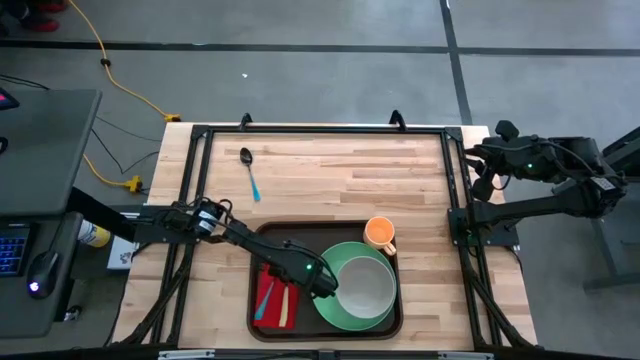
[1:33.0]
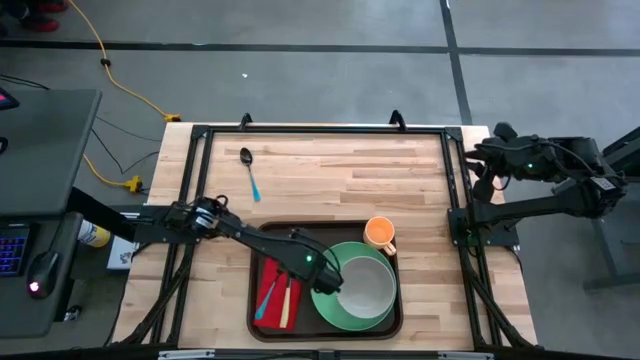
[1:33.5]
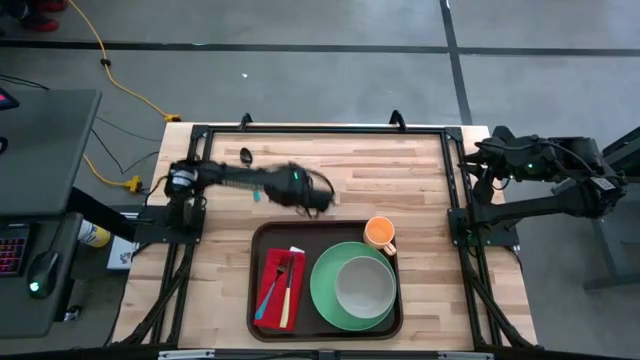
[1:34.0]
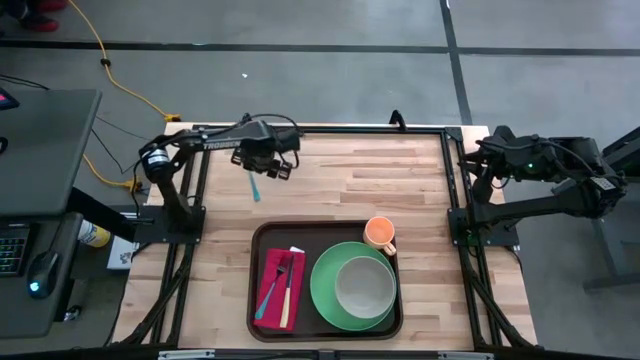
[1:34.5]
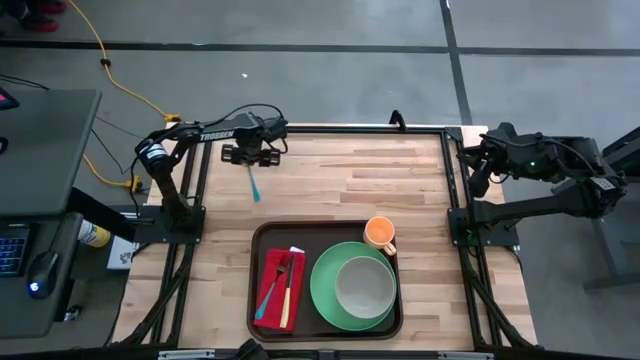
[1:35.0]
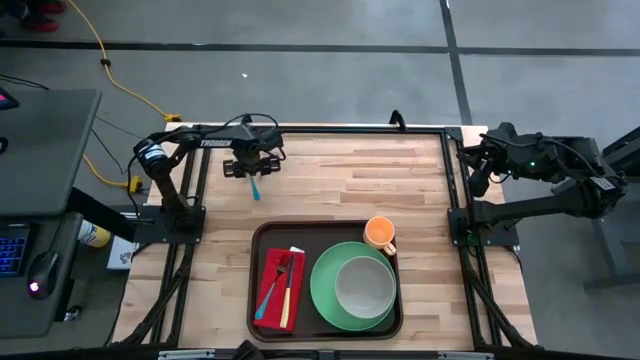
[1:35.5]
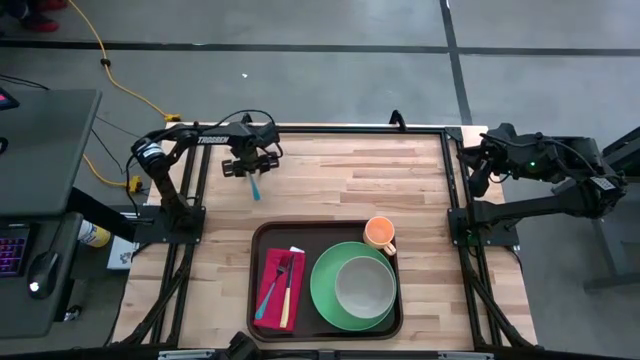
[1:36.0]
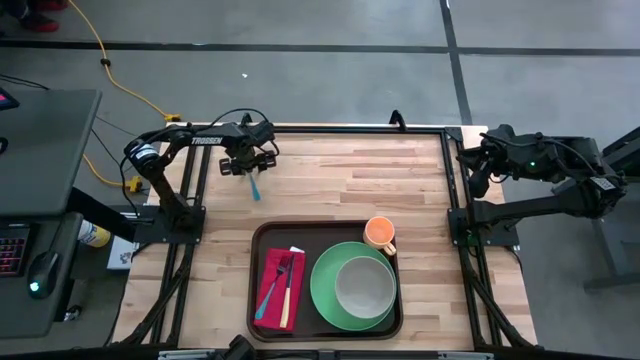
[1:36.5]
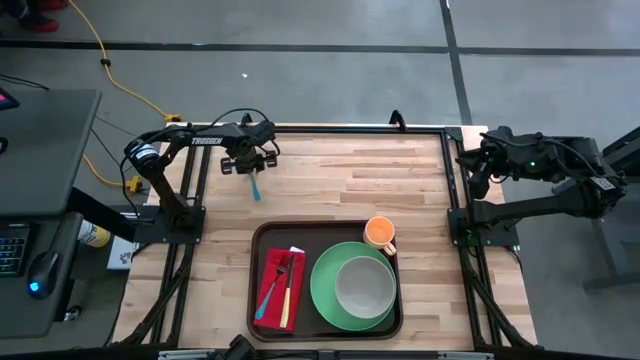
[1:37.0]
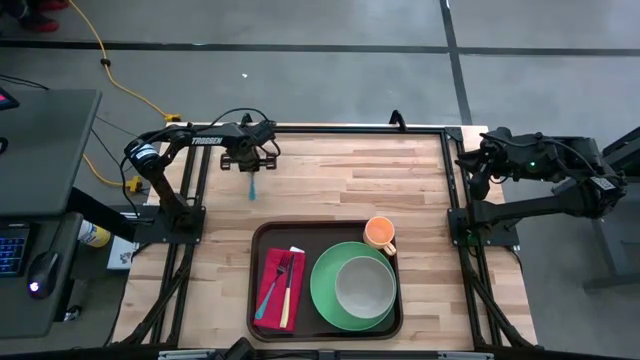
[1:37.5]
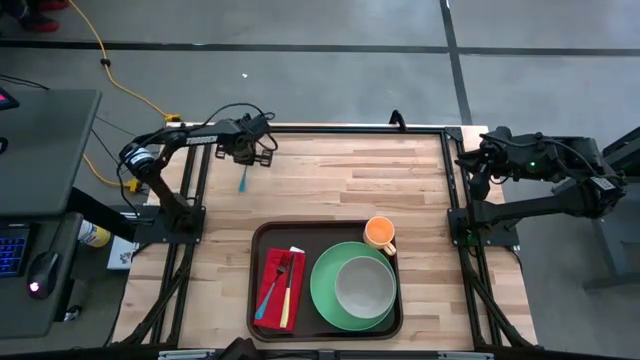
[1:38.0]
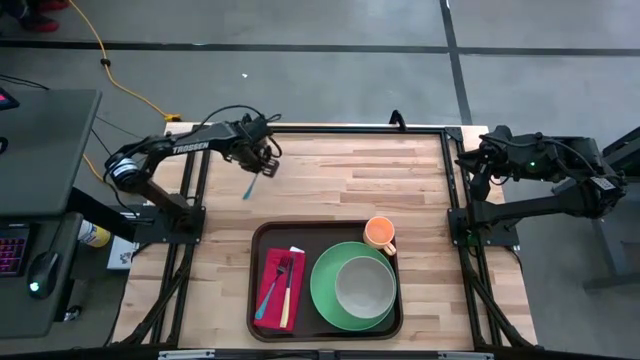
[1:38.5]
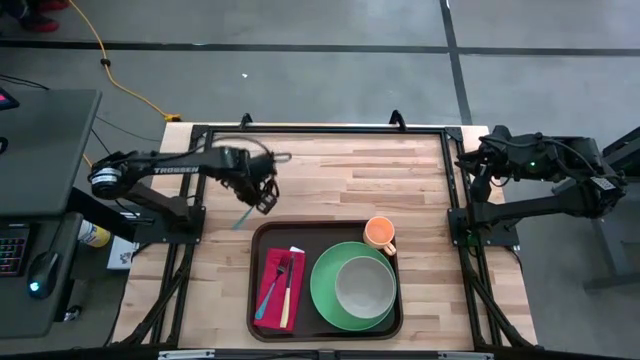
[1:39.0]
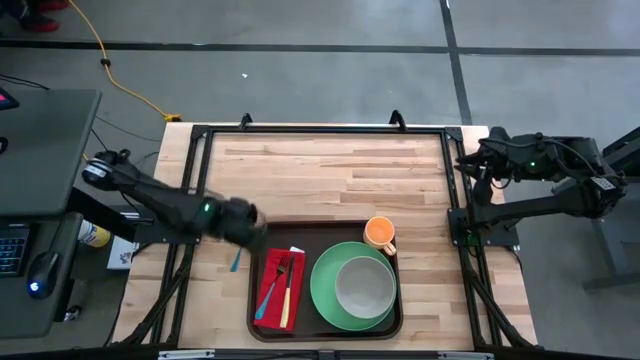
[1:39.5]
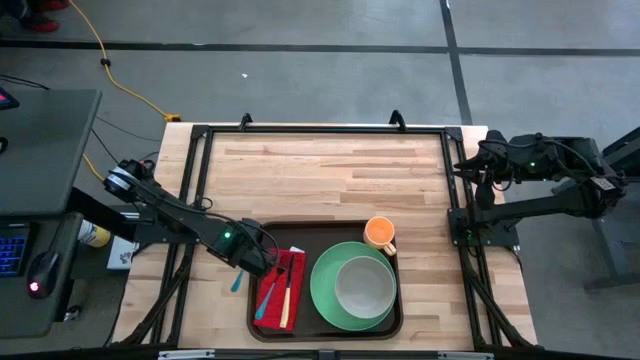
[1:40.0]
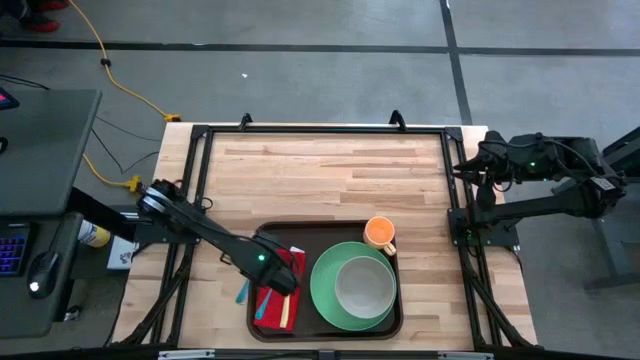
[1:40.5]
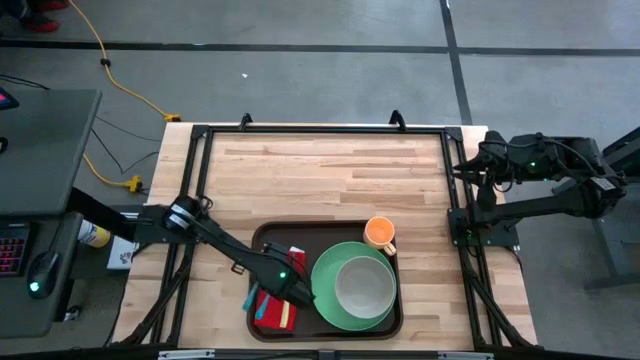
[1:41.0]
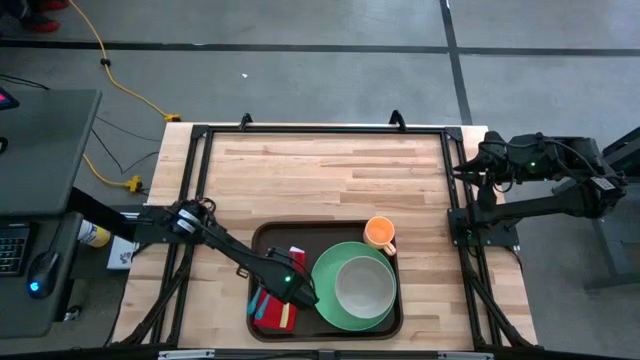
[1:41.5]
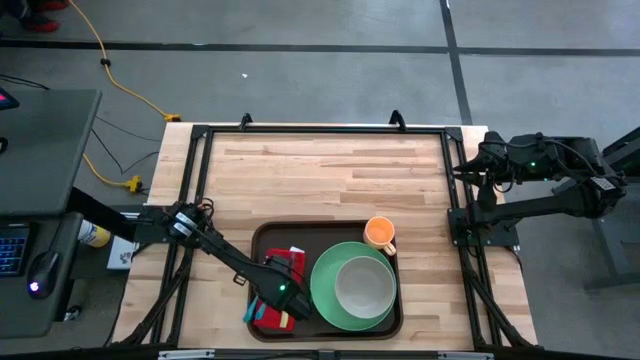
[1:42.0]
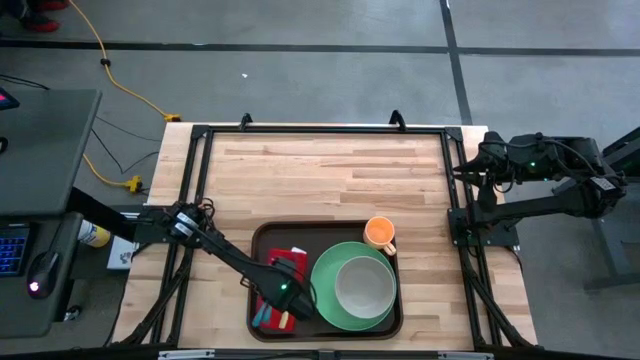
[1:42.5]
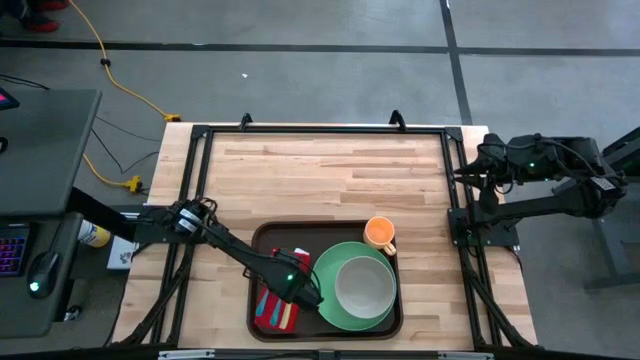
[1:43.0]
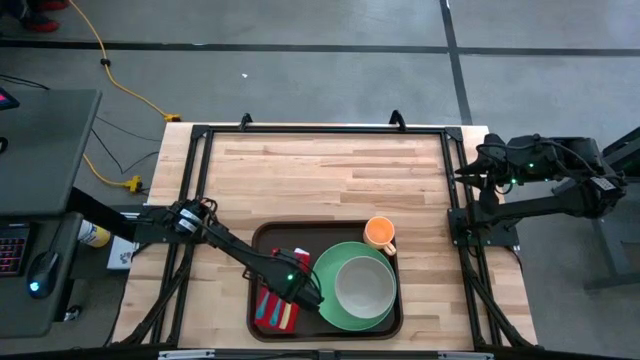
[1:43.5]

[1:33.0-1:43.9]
Task: Set up tray
Put the blue spoon on the red napkin to the left of the green plate

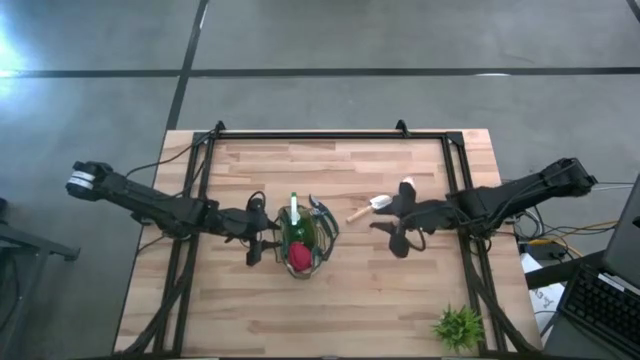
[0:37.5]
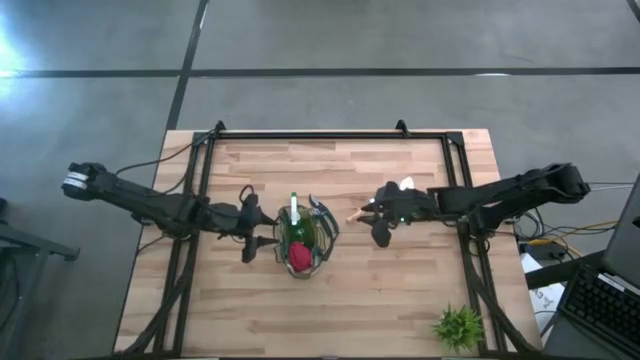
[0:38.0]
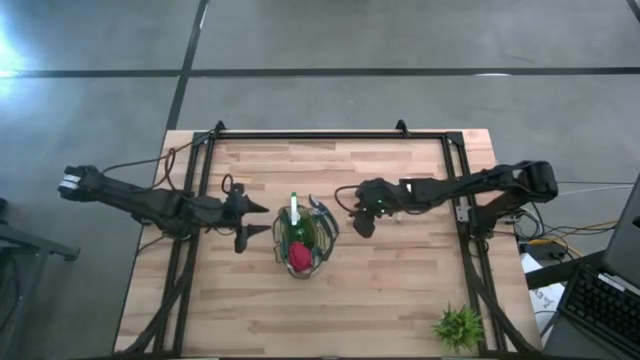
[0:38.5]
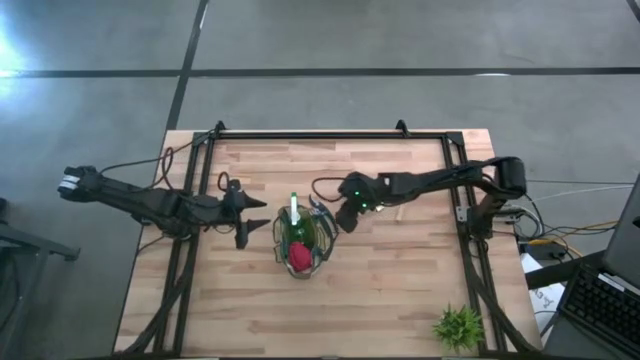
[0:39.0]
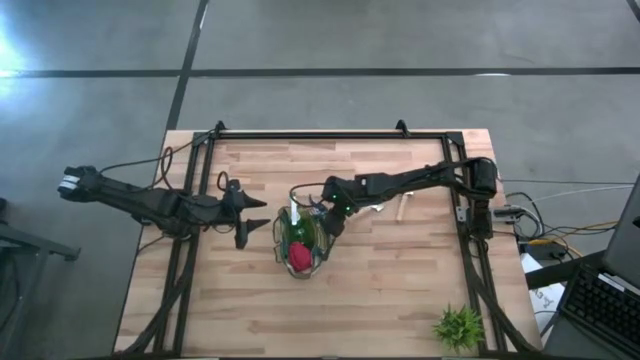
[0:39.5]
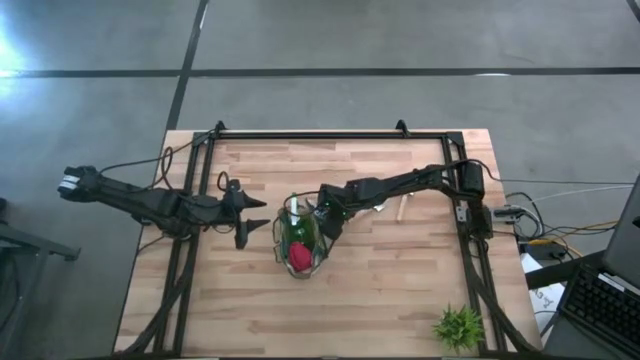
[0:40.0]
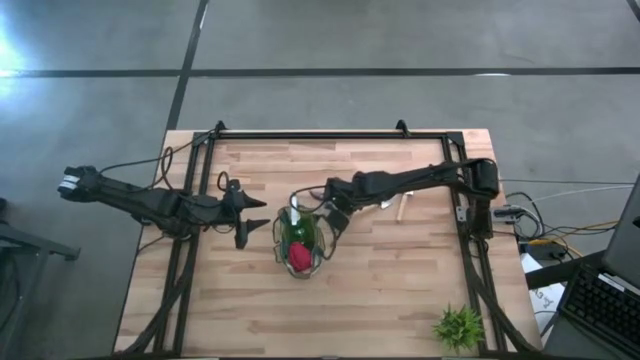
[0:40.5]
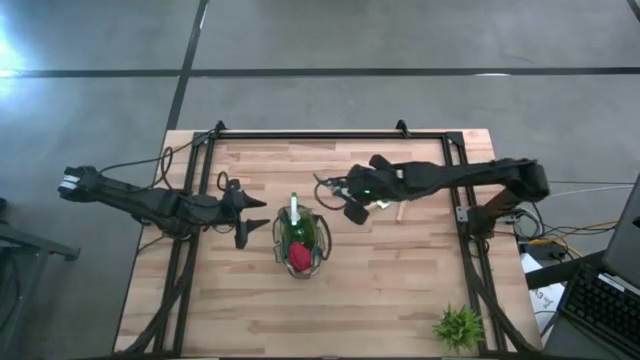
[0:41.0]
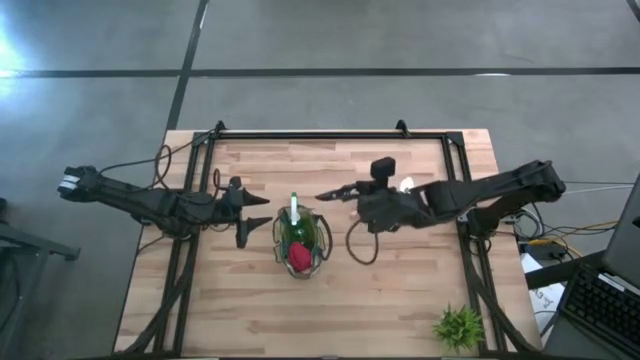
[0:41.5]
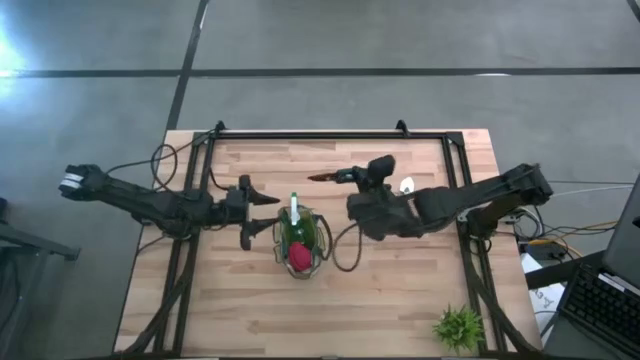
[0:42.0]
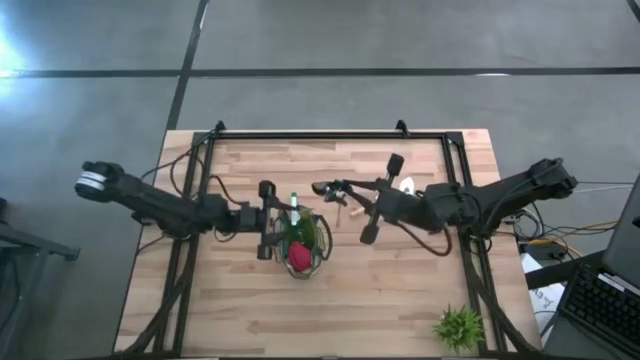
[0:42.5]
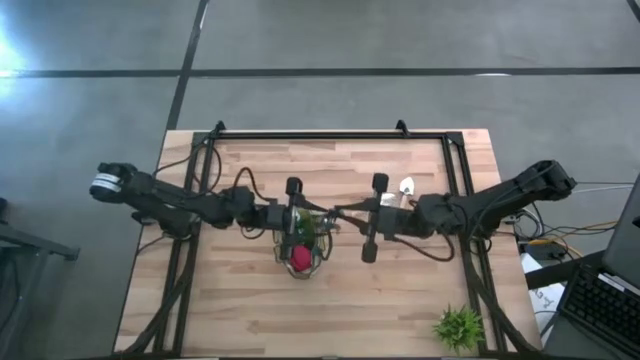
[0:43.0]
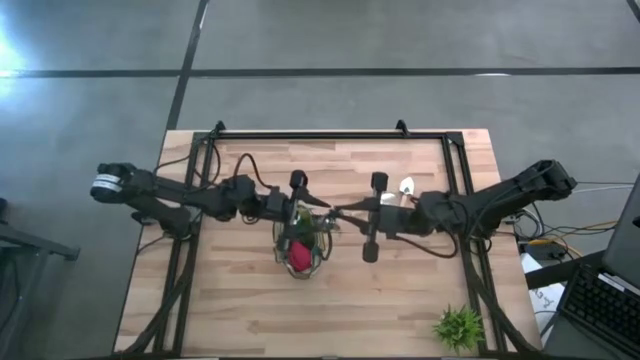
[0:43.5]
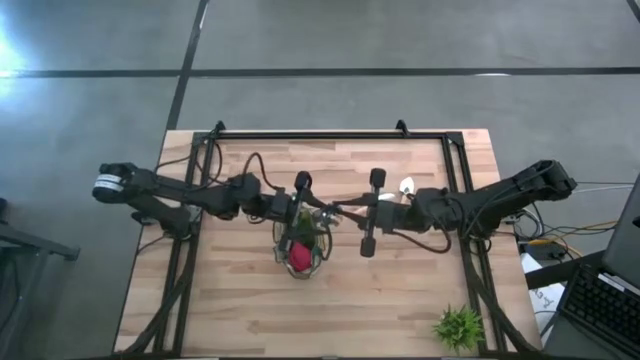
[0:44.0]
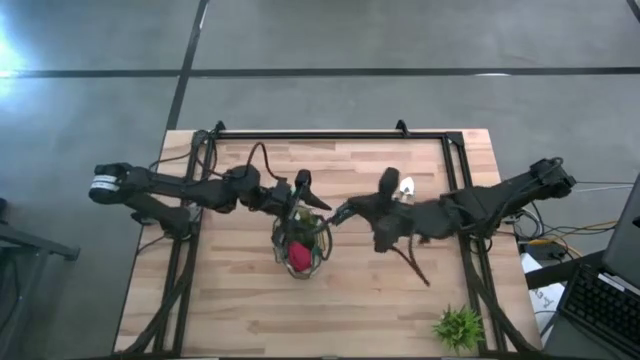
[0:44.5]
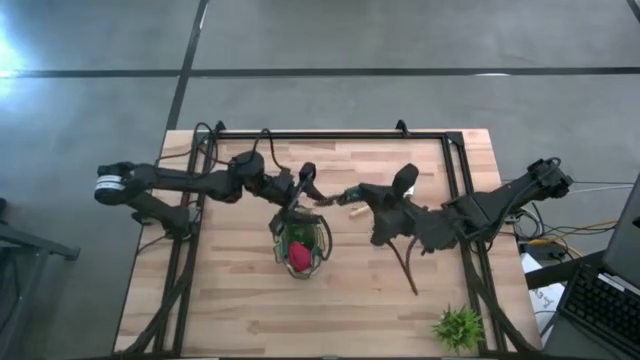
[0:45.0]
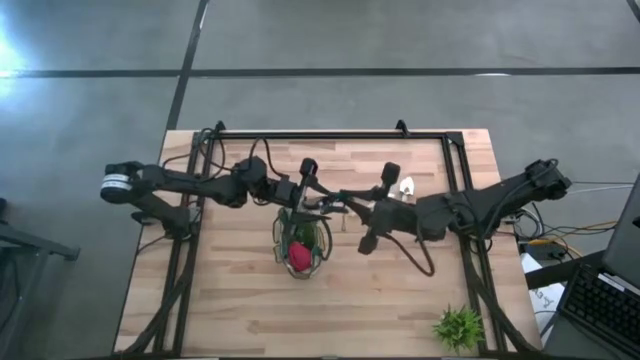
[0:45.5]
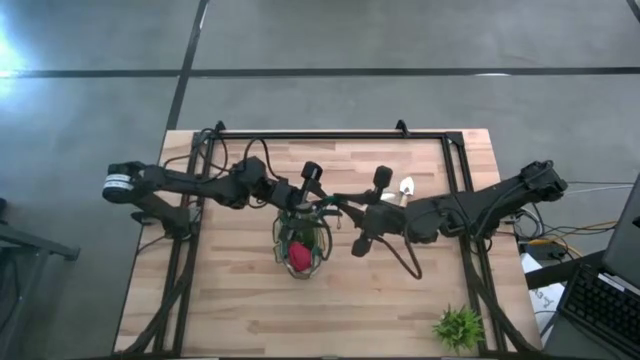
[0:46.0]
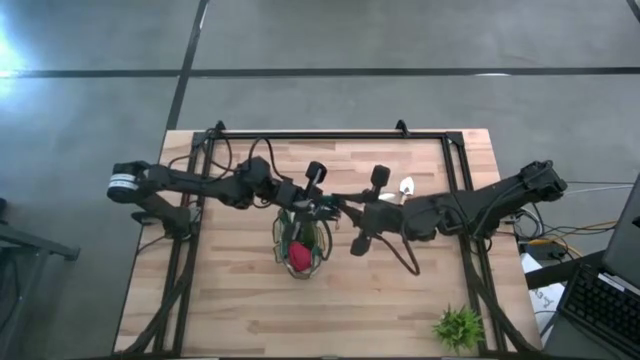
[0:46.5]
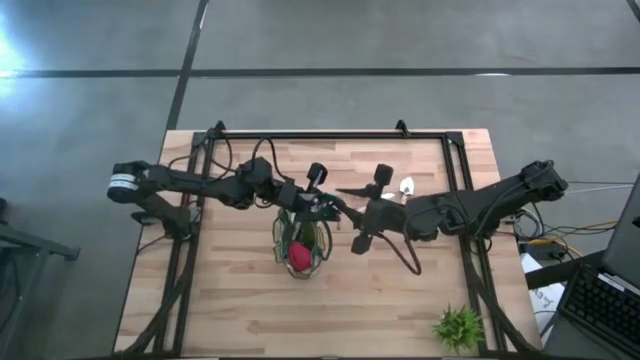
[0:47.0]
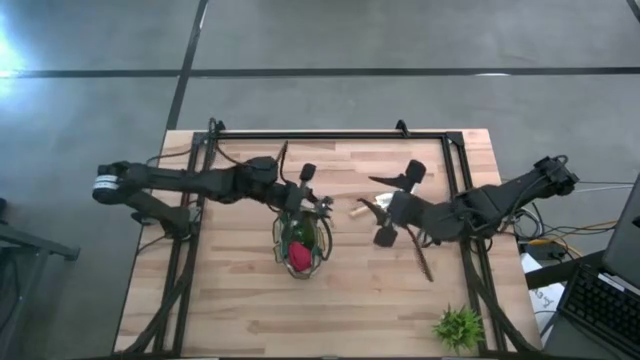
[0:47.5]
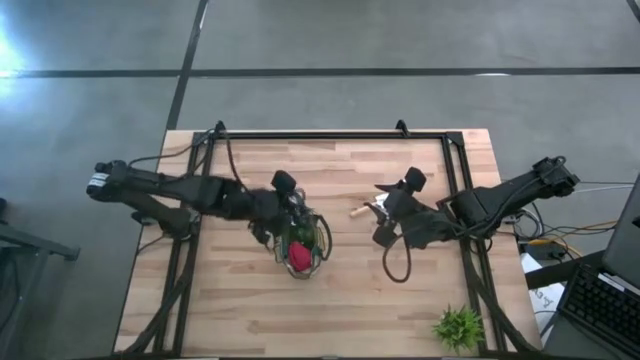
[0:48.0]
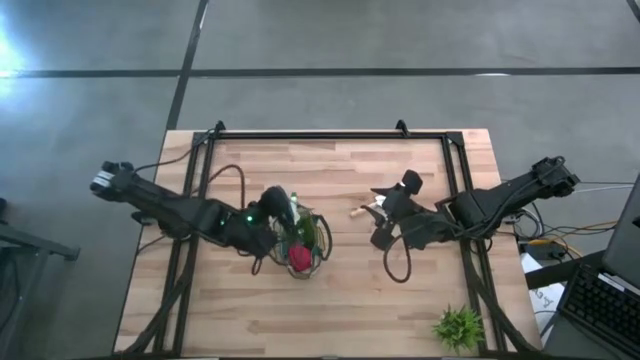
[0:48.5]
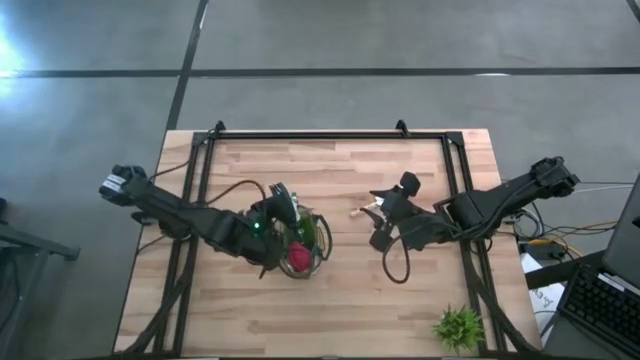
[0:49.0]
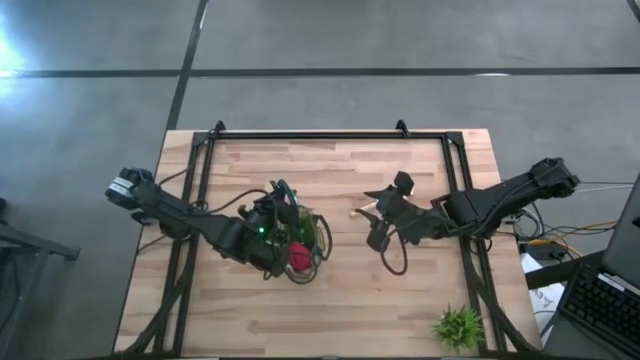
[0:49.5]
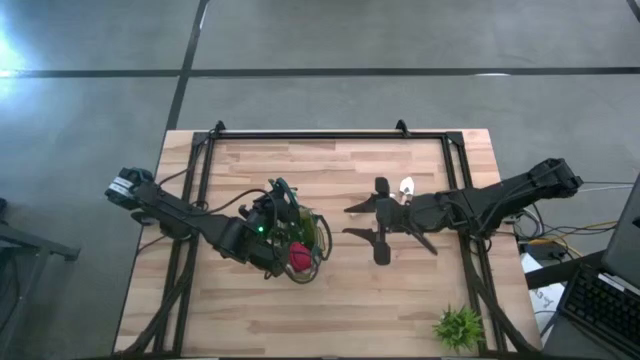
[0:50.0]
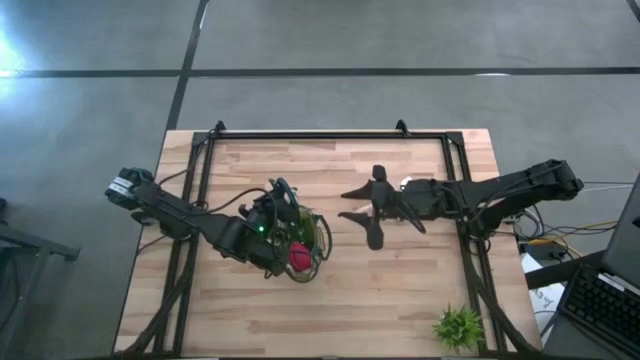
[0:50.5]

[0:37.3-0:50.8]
Task: Pick & Place Garden tools in Gardening bag
Put the green shear scissors into the gardening bag
